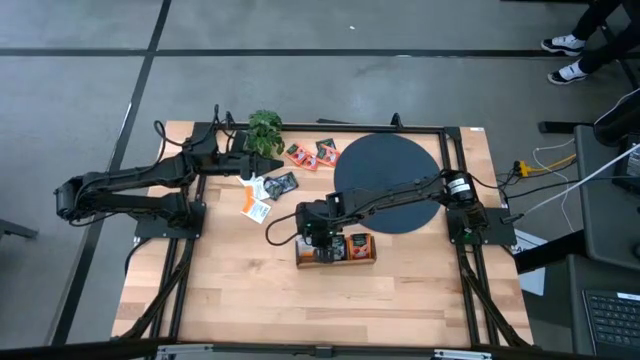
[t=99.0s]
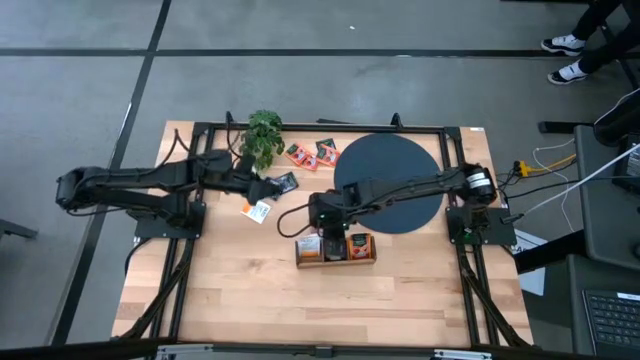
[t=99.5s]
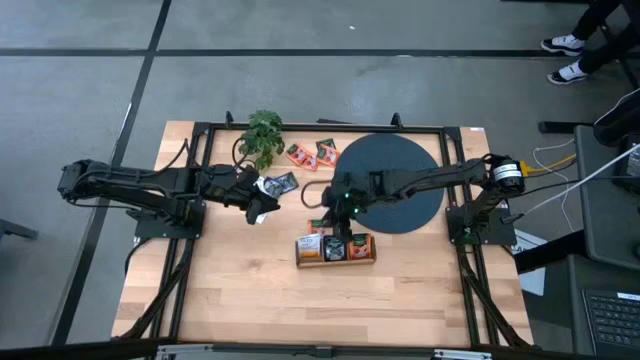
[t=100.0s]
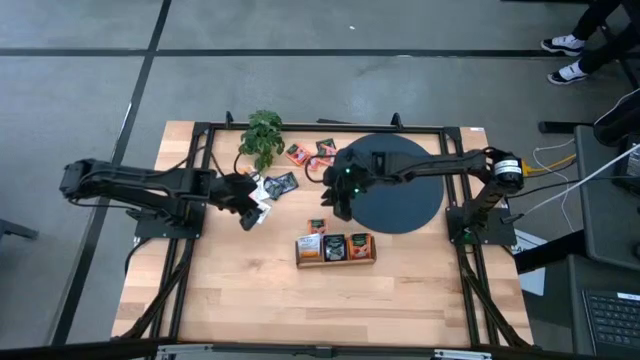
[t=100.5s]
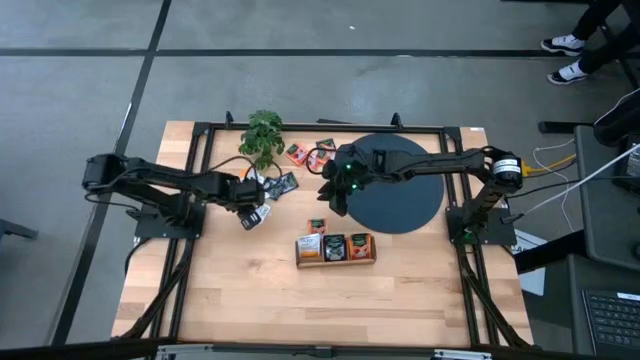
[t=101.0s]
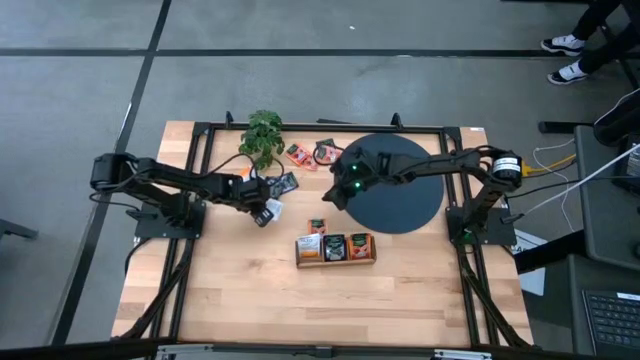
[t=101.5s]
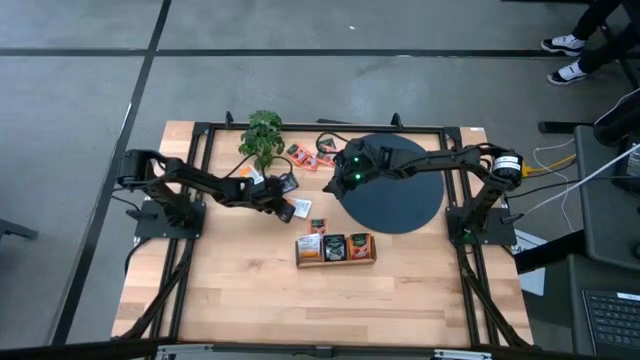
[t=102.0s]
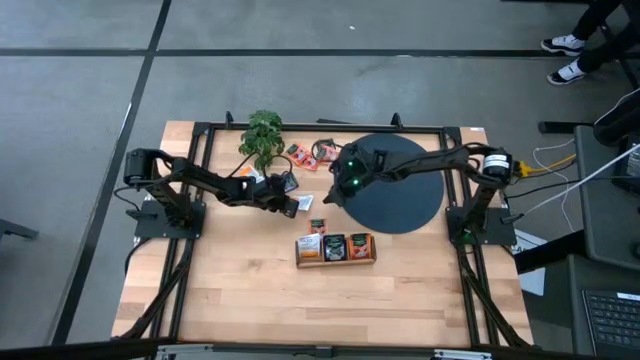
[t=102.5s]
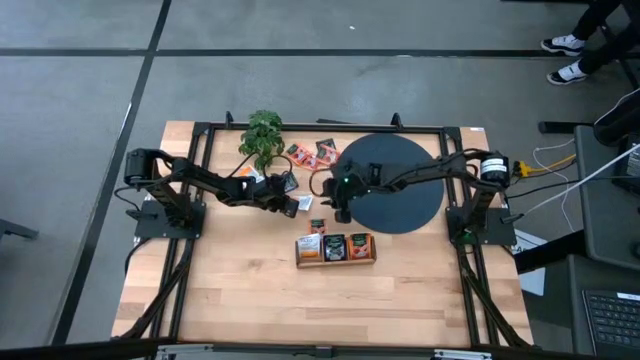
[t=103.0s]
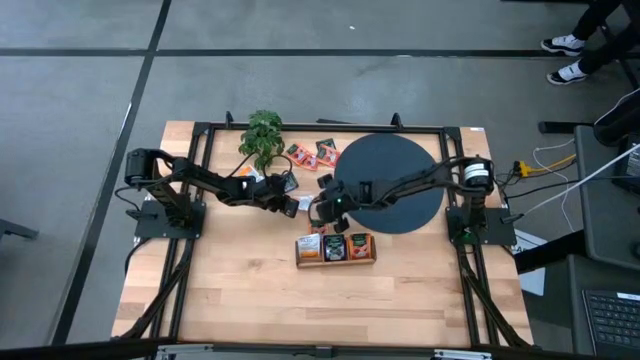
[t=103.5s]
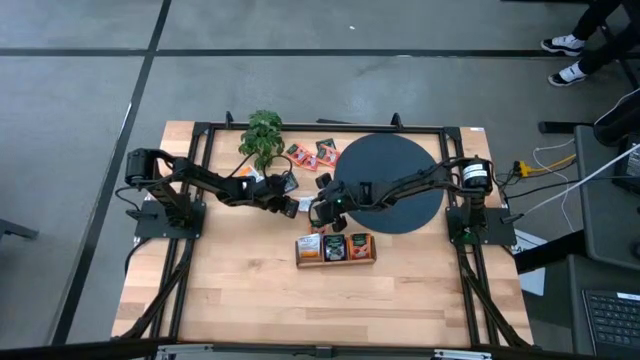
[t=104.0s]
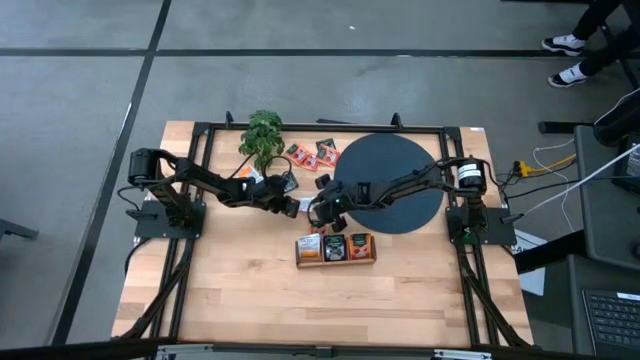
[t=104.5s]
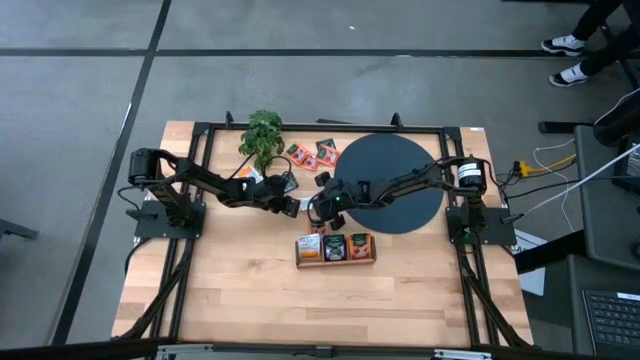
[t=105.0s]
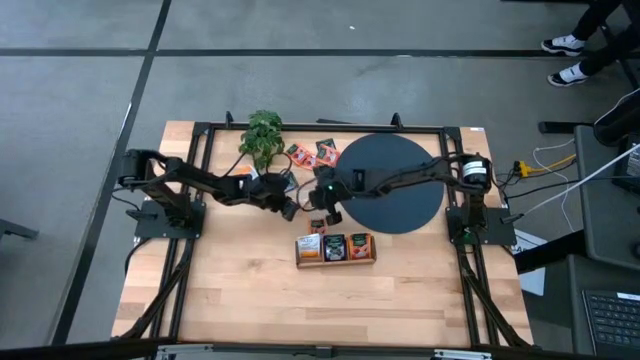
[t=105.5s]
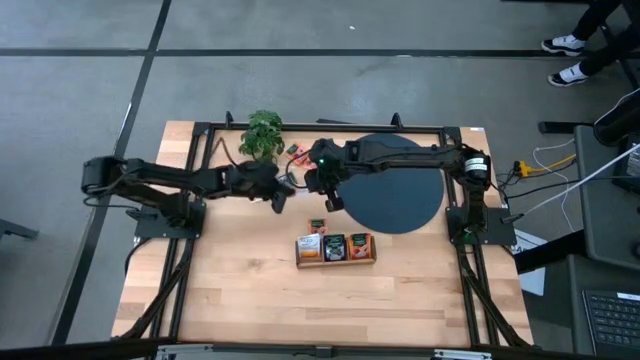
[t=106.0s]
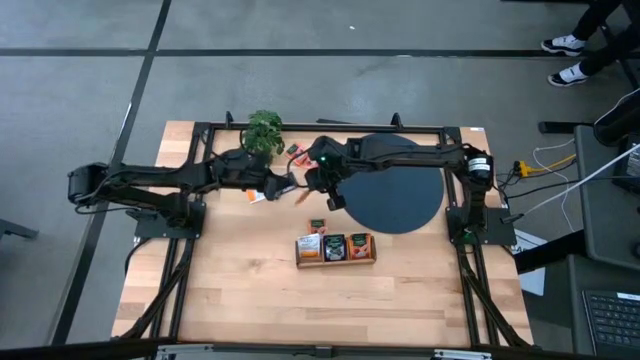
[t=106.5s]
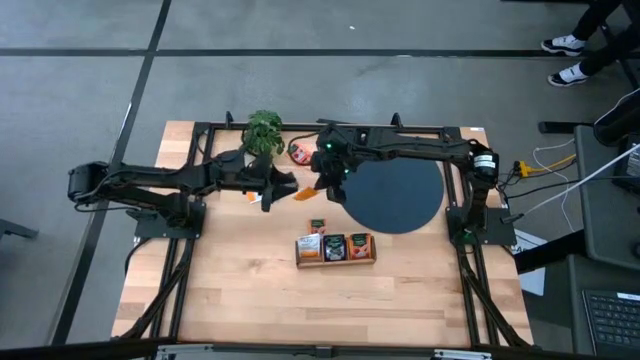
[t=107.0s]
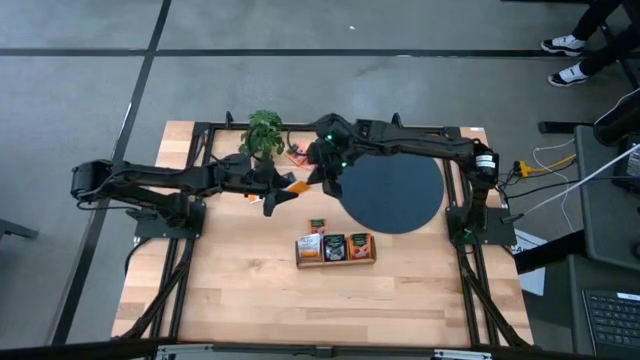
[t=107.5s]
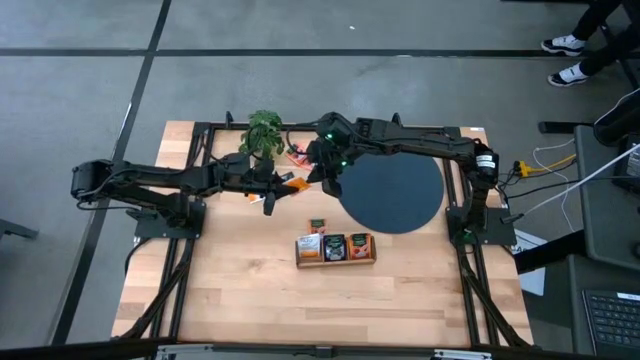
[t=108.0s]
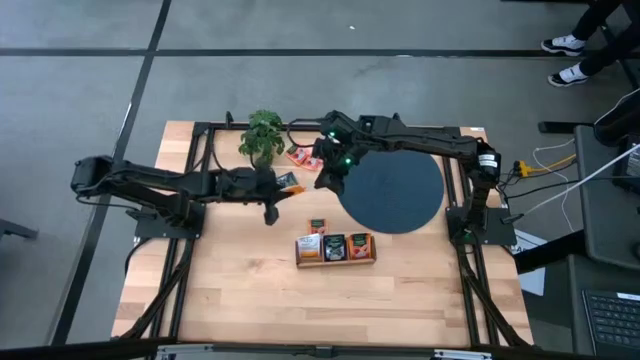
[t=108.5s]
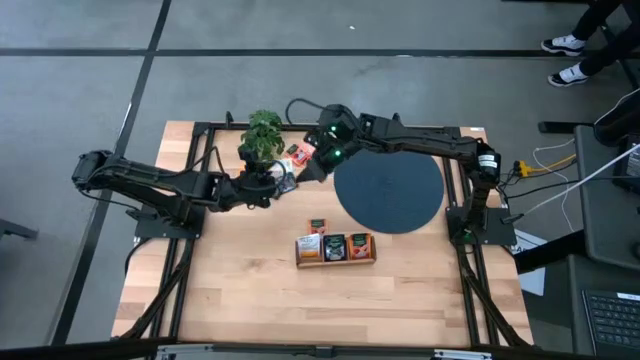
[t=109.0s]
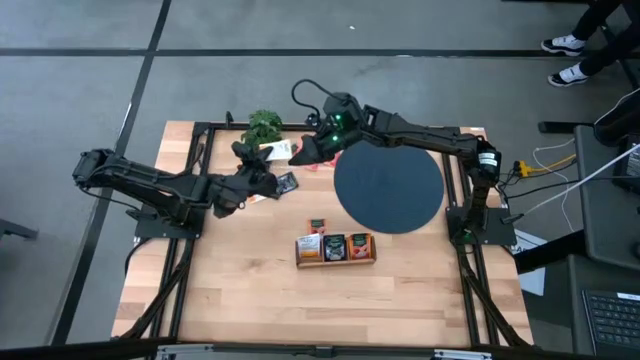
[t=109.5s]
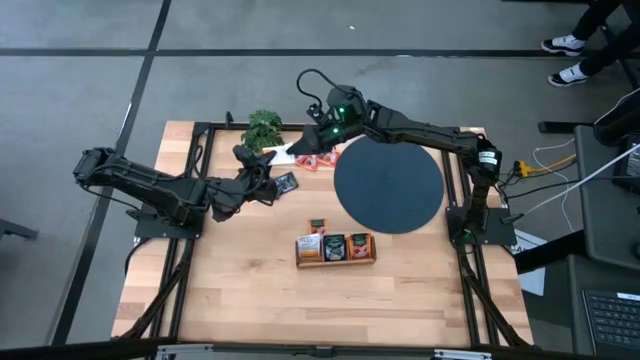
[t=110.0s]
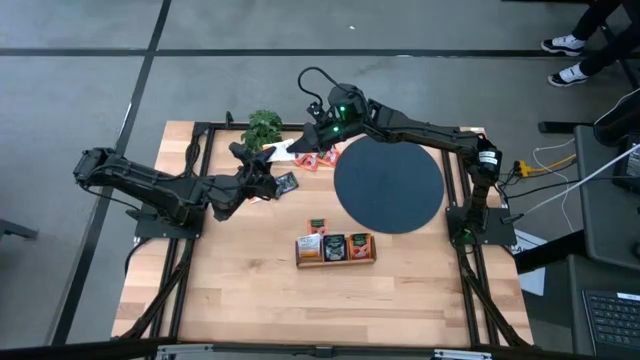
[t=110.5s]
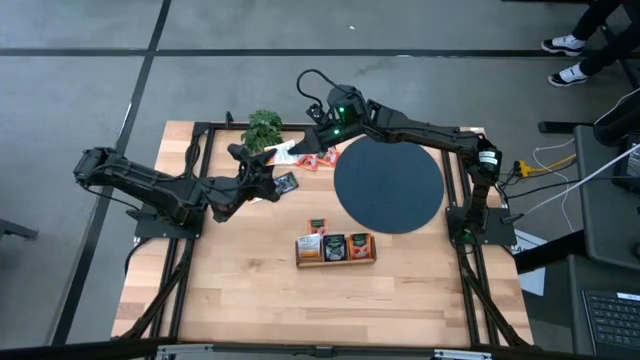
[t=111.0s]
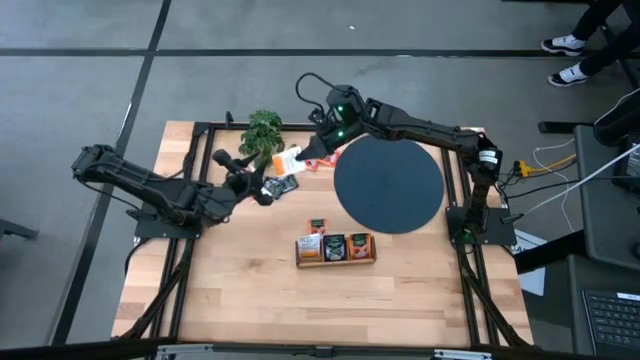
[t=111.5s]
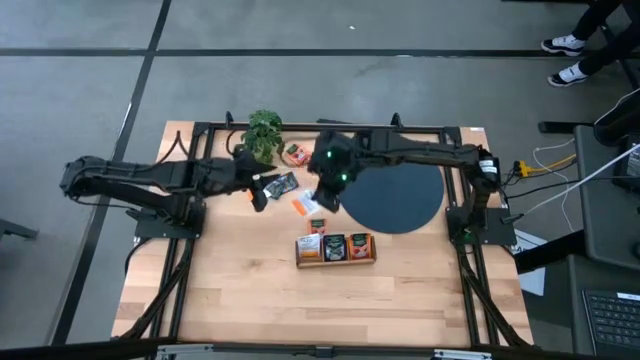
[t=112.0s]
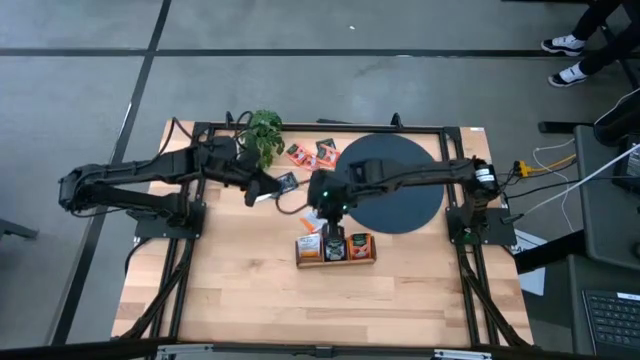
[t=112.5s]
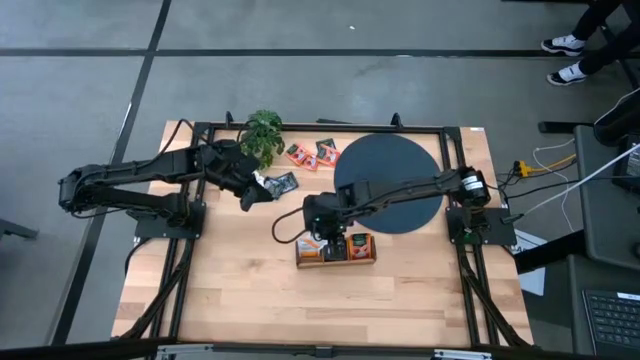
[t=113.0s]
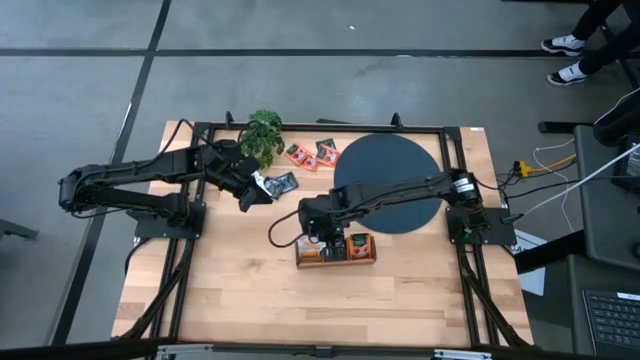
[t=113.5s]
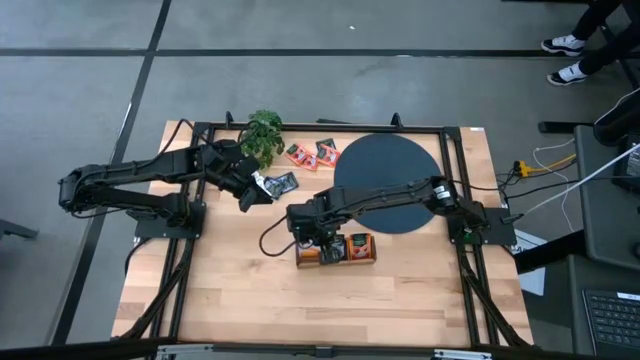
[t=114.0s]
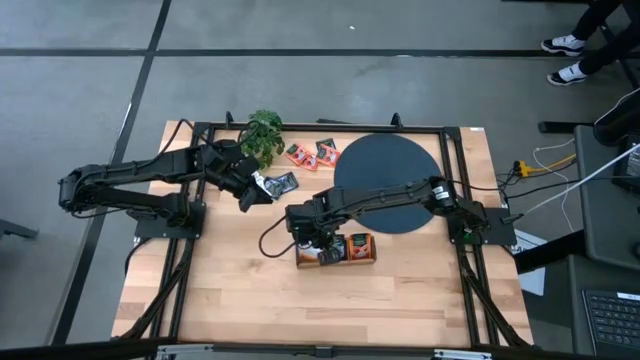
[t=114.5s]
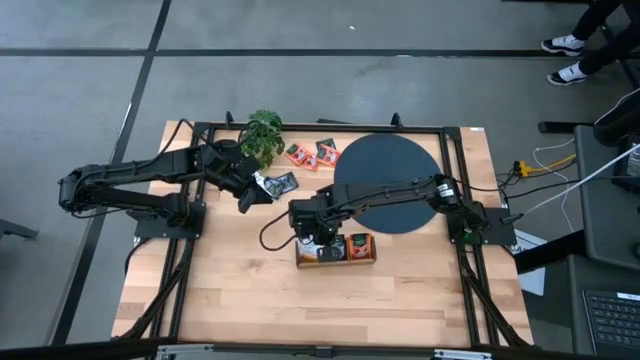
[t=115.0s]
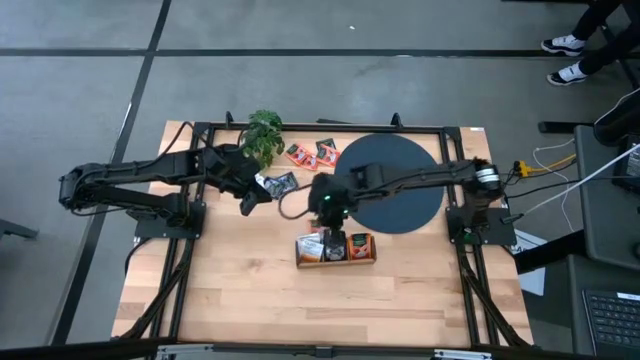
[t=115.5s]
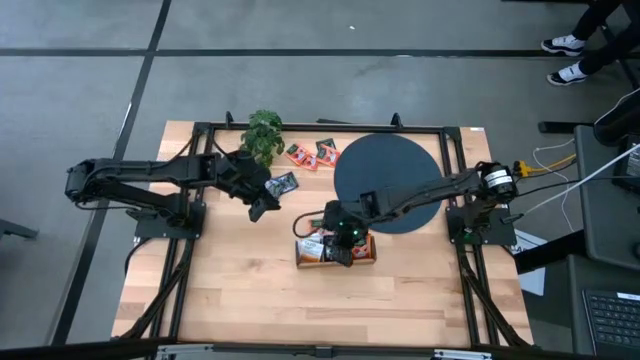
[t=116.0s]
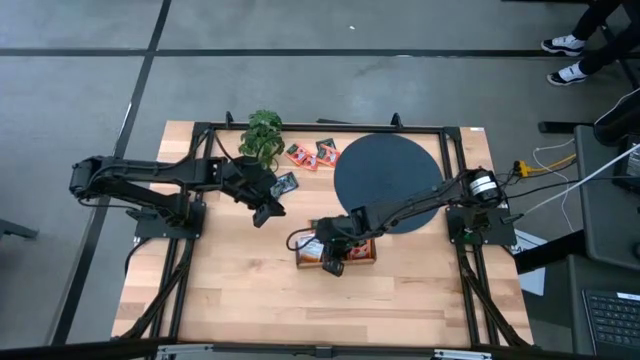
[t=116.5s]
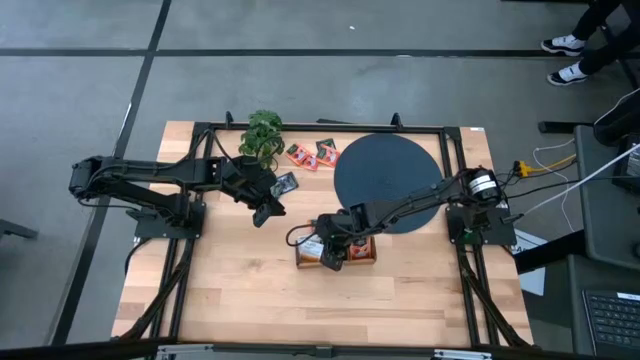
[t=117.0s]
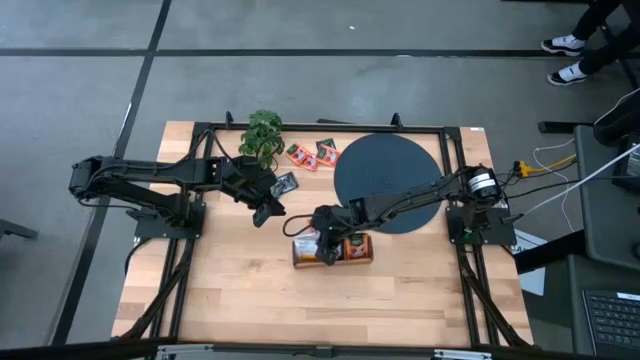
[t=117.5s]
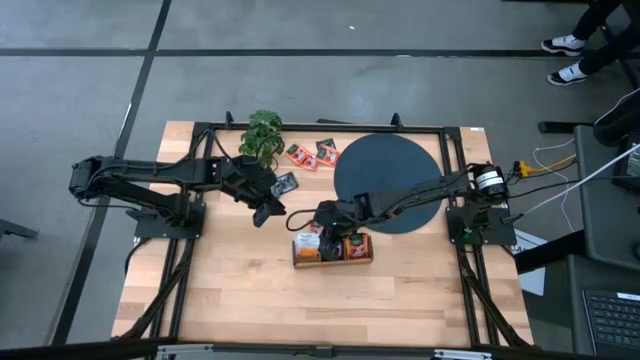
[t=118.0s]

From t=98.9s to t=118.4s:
Task: Pick & Place Tea
Put the bottom white tea bag into the left section of the wooden organizer

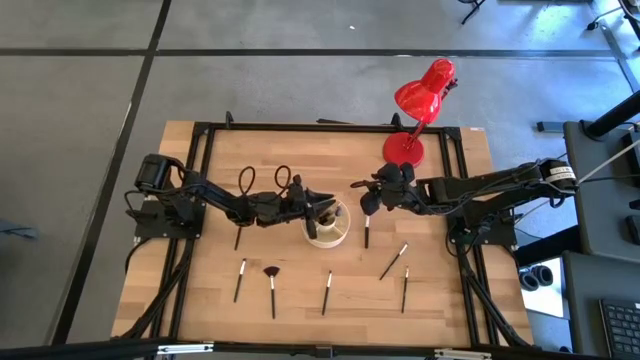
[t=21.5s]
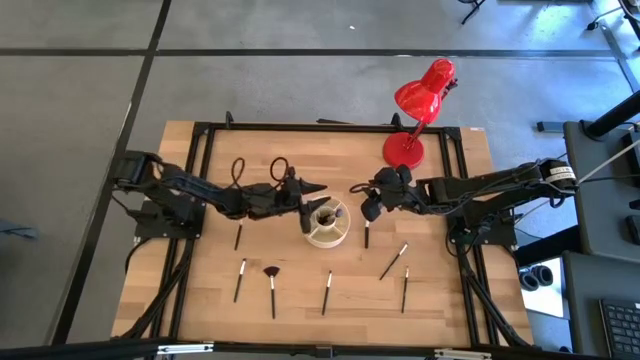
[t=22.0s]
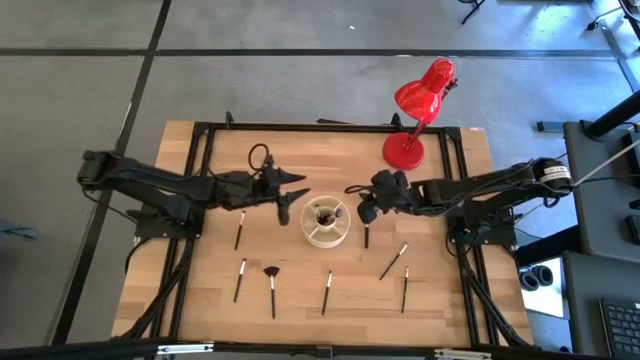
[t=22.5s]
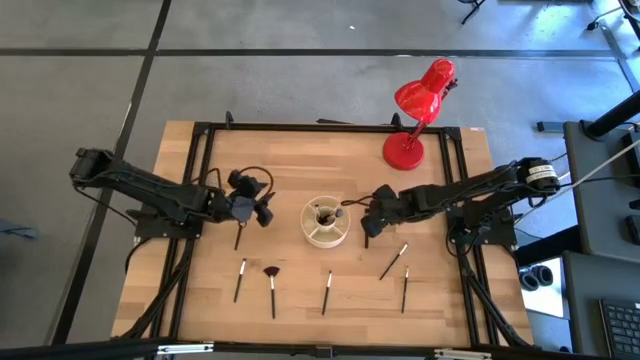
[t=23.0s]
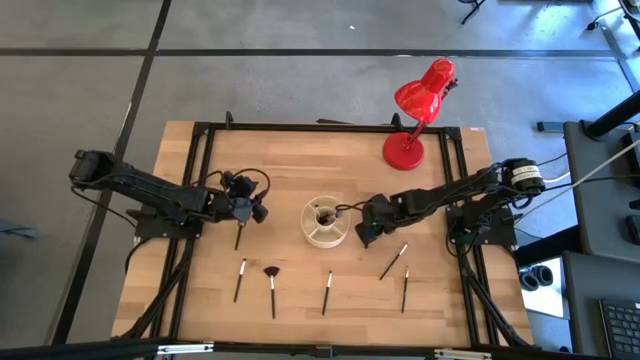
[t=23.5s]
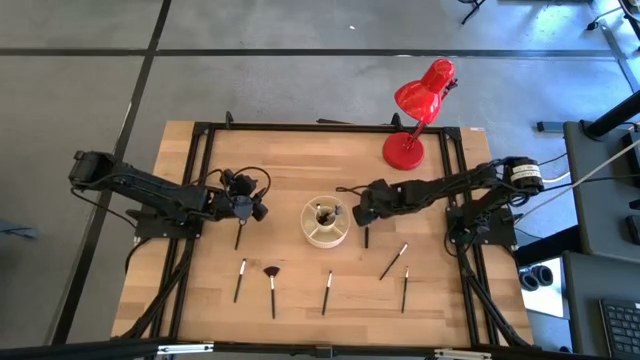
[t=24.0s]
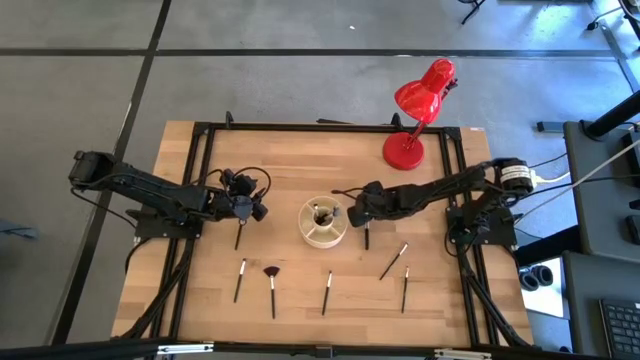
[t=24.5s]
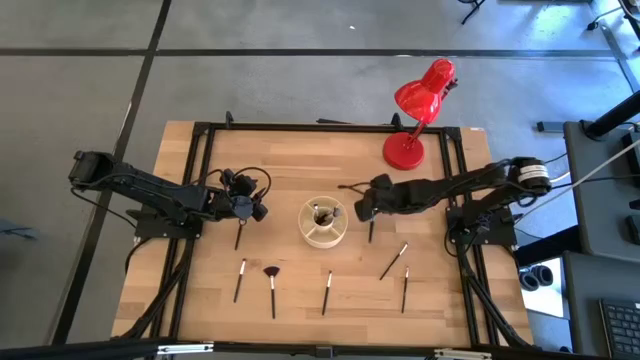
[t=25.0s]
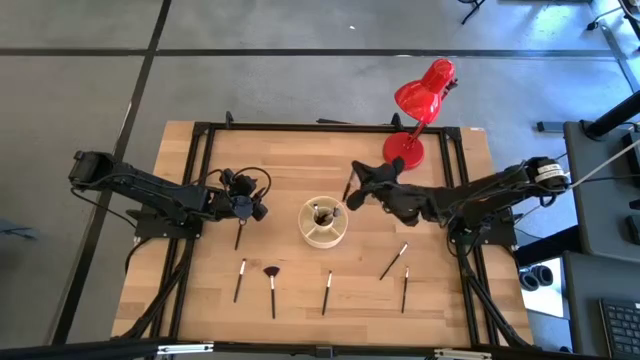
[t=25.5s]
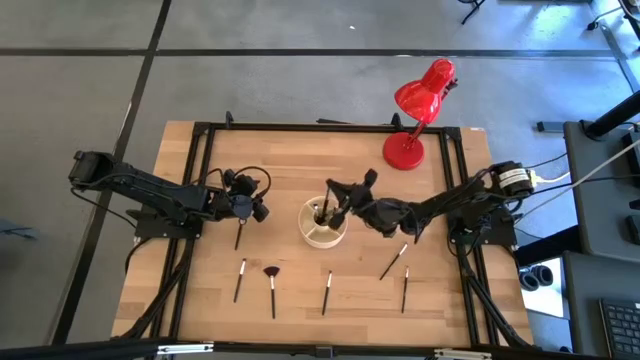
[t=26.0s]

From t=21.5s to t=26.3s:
Task: Put items in baskets/containers
Put the black powder brush into the white brush holder
